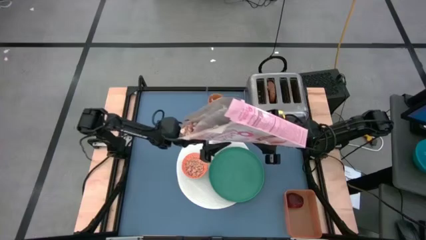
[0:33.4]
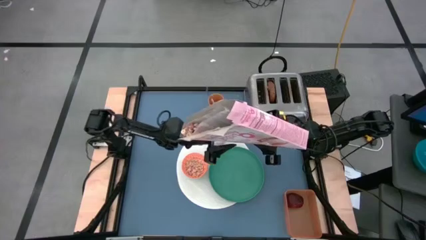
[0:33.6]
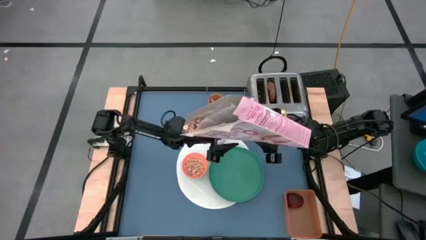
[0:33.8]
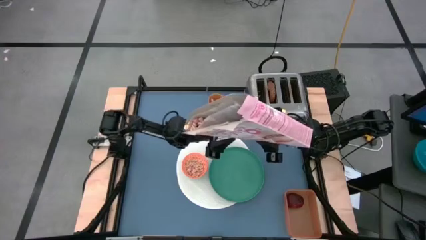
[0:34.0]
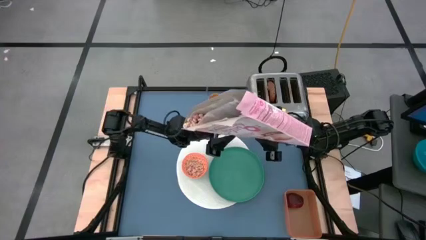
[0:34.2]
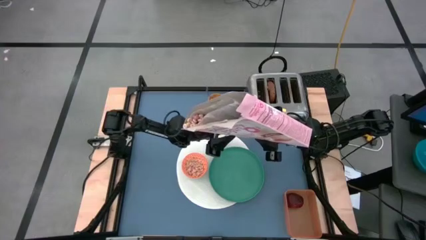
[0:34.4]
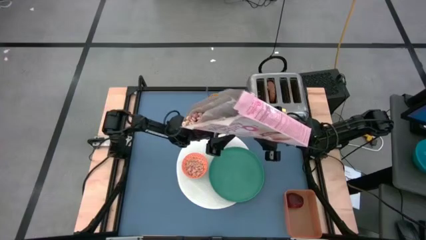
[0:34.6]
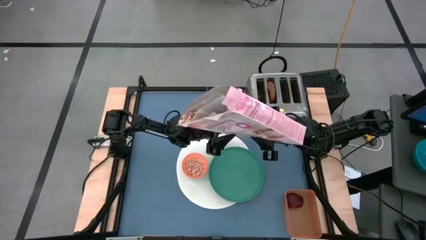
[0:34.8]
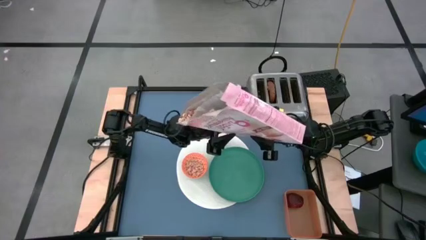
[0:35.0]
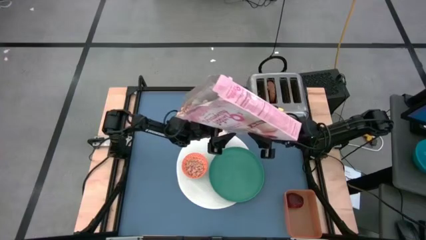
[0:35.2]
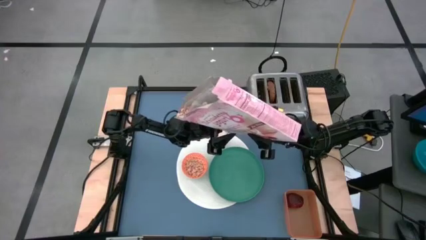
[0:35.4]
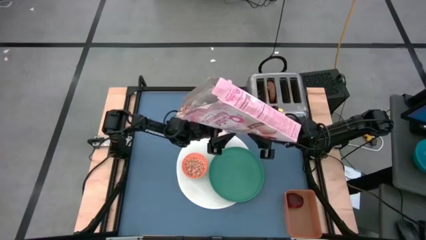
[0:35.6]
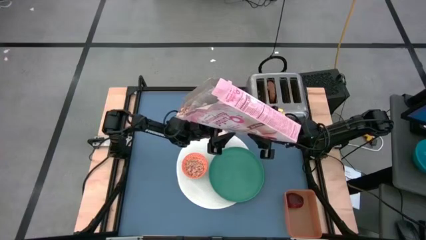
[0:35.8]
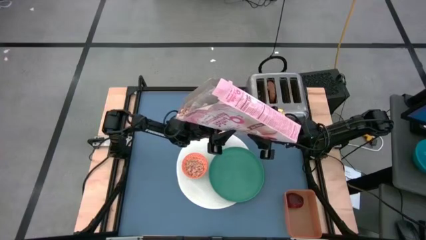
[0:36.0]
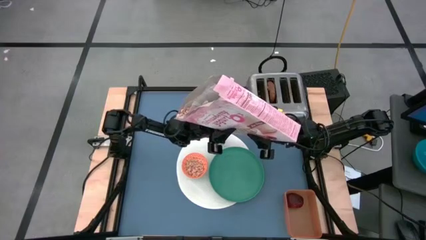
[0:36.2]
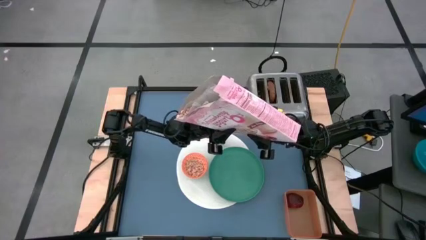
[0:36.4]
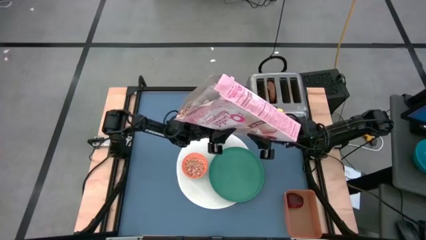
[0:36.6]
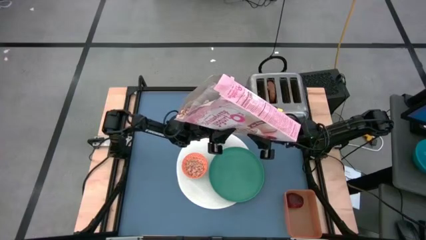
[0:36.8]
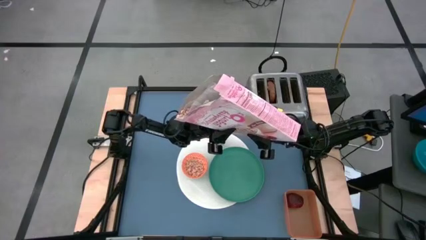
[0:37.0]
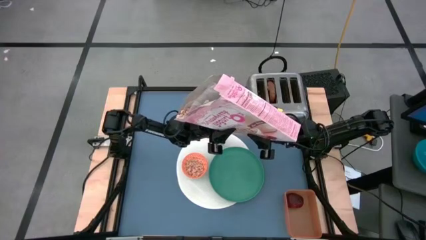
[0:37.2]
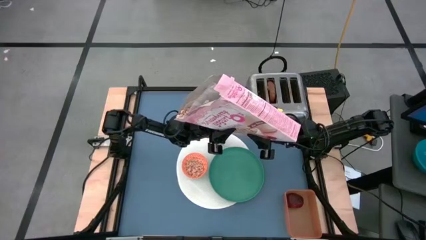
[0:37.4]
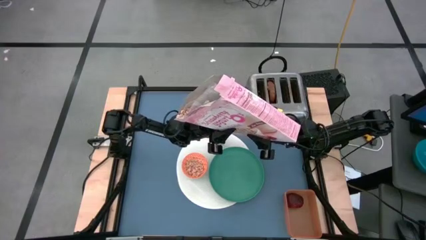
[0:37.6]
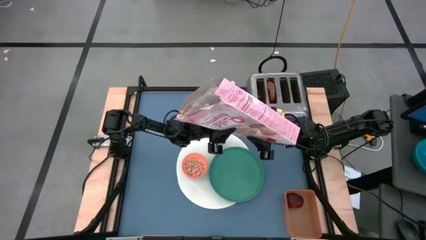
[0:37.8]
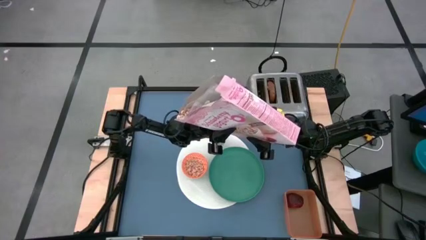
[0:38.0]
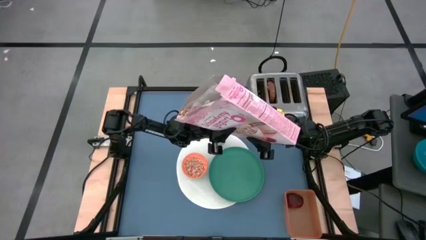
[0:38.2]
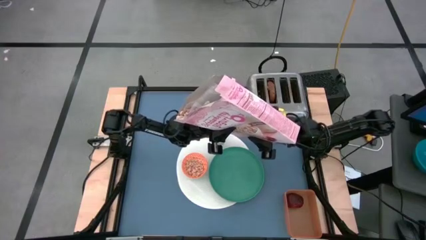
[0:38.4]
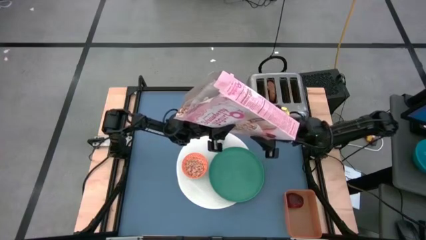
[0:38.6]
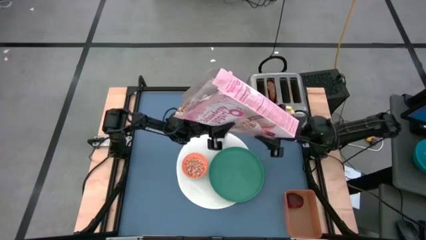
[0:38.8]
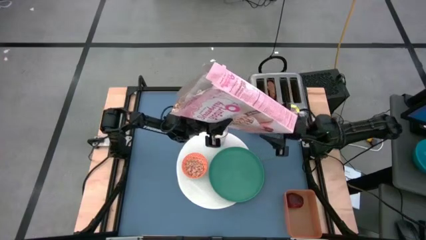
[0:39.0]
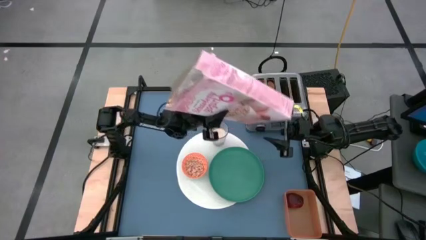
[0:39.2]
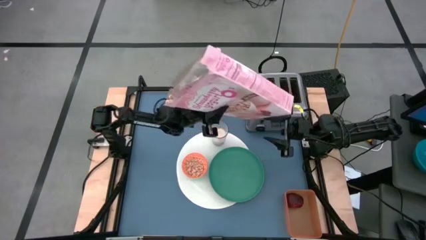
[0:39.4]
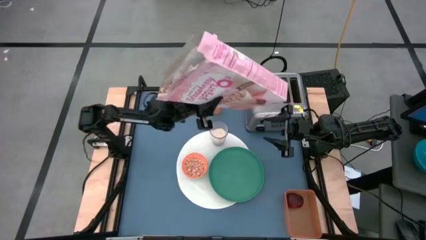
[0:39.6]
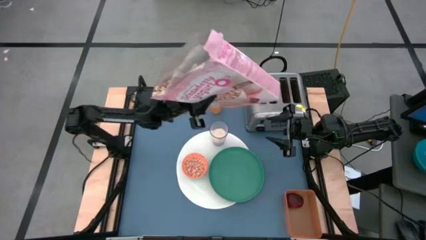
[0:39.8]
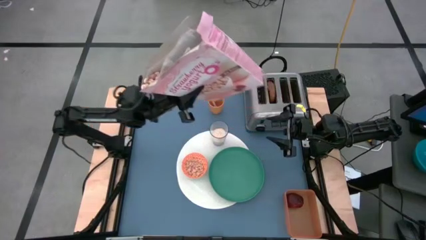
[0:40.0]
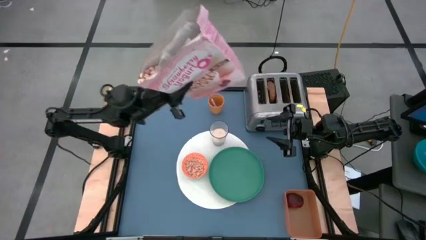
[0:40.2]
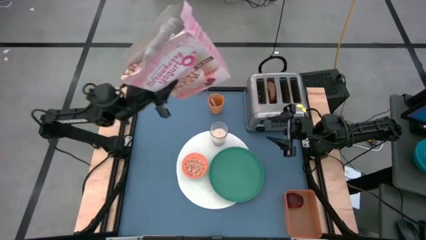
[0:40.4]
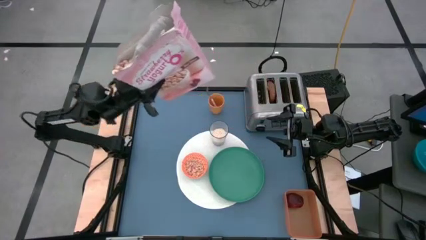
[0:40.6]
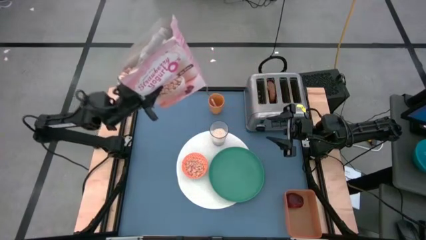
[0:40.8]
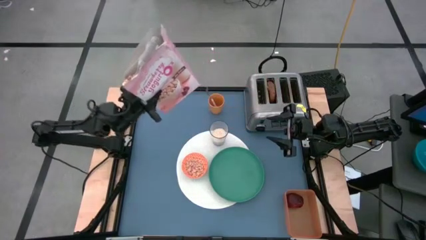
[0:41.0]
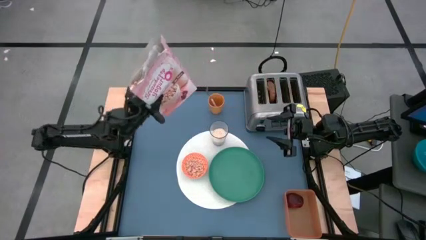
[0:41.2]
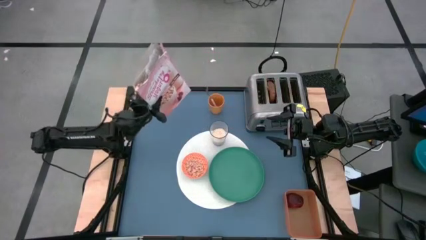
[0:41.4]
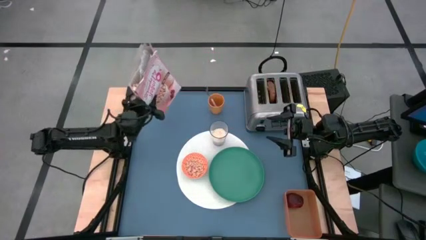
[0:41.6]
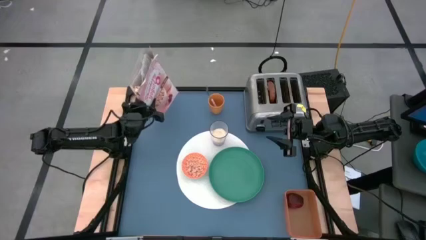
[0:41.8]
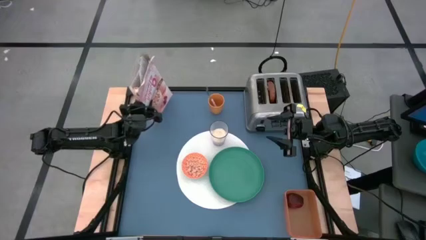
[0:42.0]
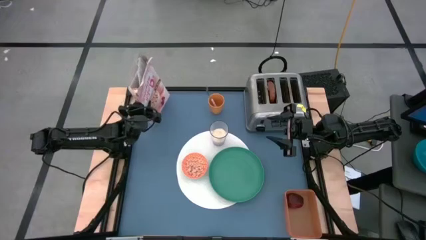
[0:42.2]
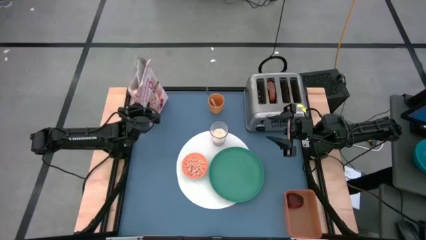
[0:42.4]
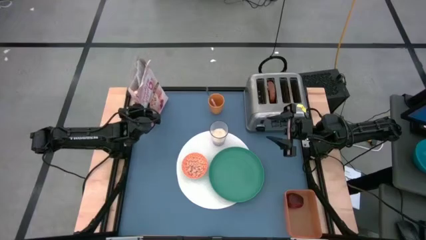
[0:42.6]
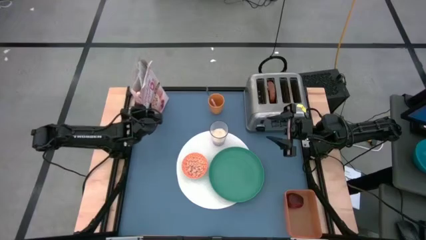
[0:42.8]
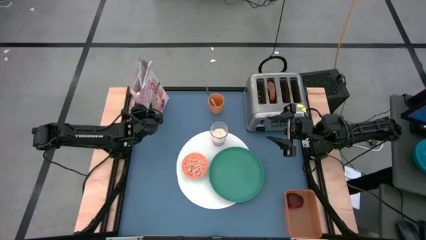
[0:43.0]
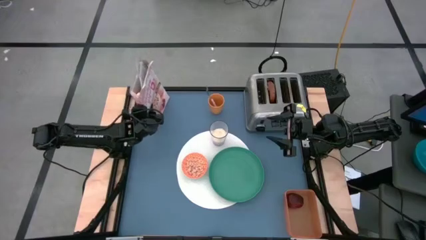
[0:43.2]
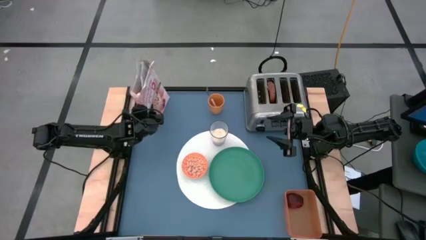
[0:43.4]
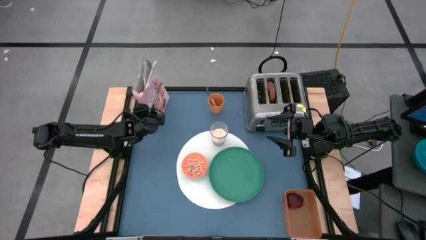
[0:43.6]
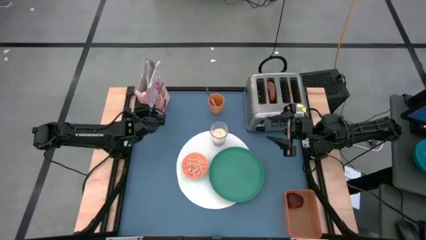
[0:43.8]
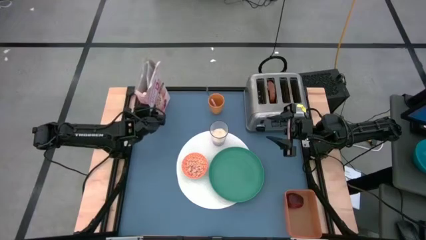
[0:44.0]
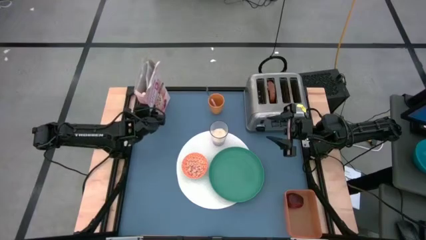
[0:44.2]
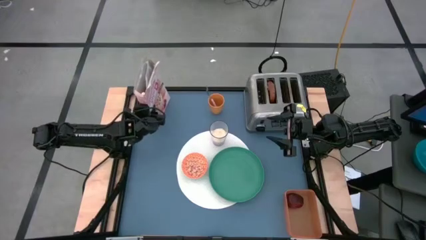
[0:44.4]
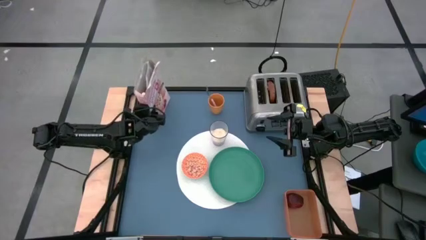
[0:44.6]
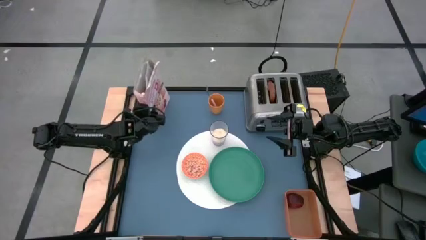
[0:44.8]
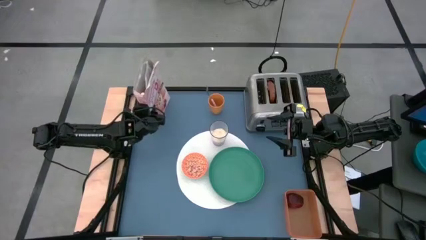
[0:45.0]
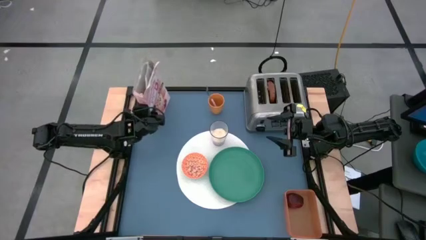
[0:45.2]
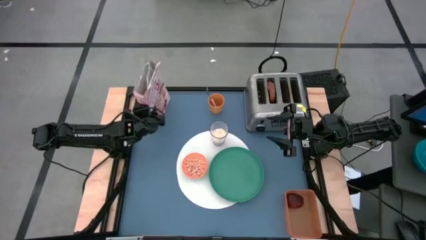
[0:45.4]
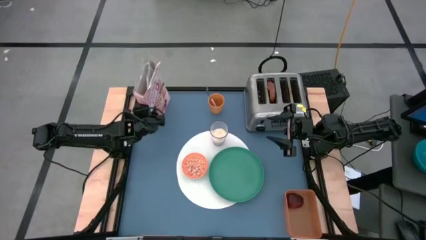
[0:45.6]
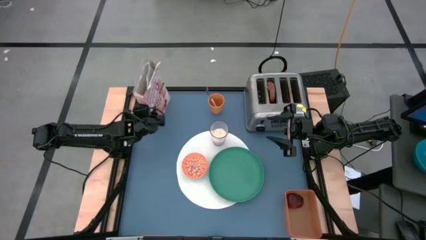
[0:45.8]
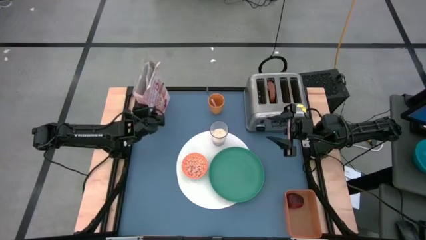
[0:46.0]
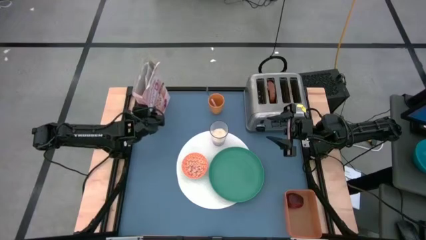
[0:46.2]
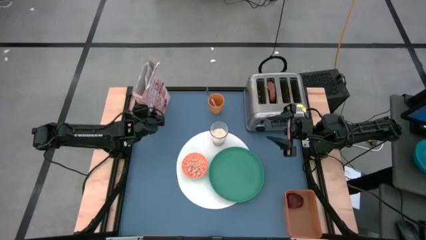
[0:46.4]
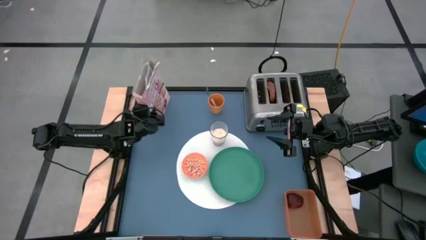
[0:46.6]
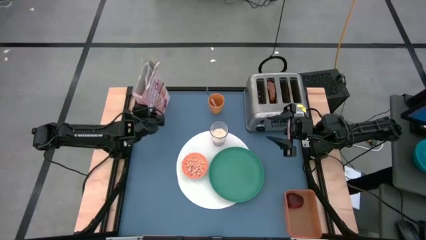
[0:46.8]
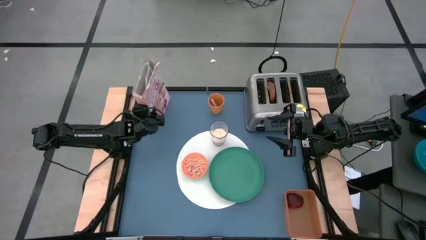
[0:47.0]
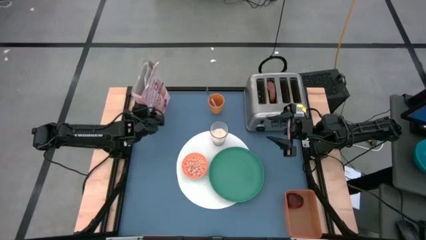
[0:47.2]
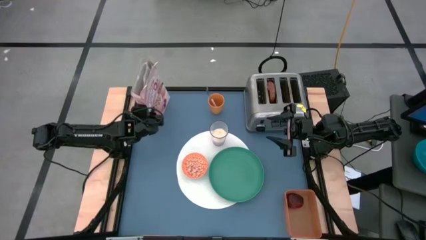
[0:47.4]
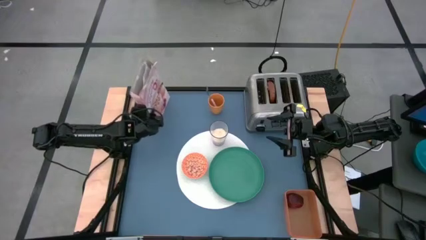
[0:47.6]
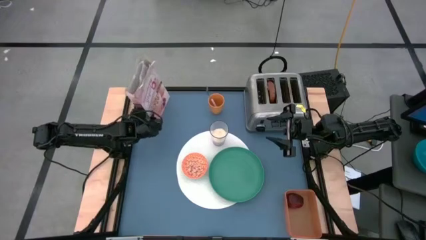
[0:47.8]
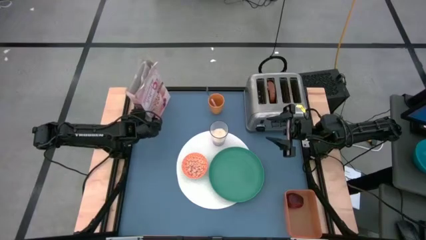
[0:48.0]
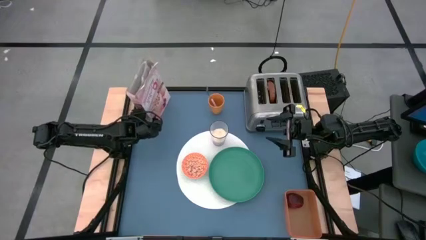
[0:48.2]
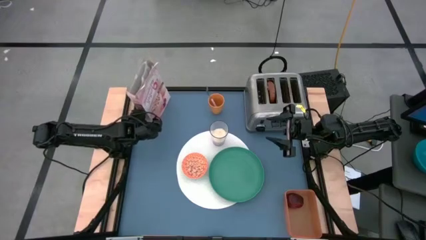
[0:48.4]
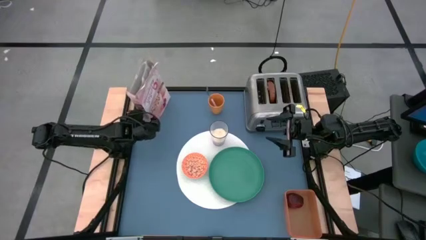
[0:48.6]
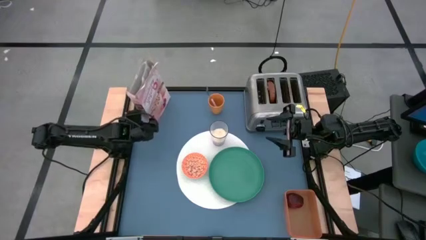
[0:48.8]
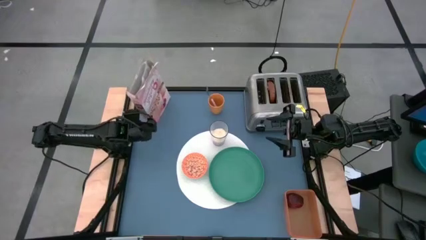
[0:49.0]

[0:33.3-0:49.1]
Task: Arrange a breakfast setting
Pour the cereal from the cereal box into the orange bowl

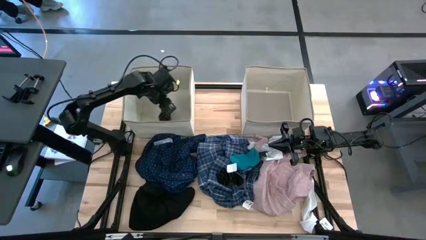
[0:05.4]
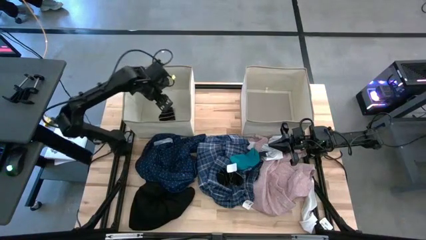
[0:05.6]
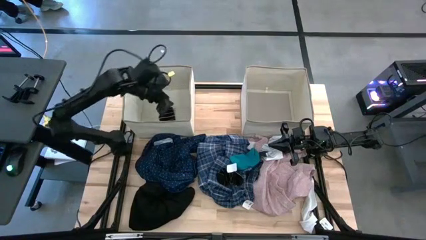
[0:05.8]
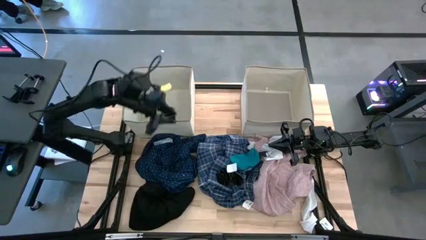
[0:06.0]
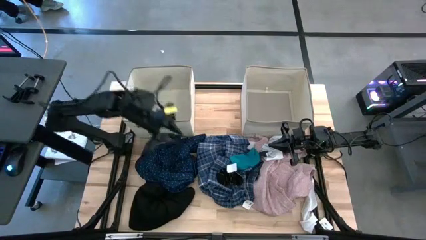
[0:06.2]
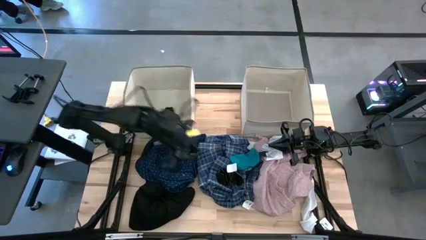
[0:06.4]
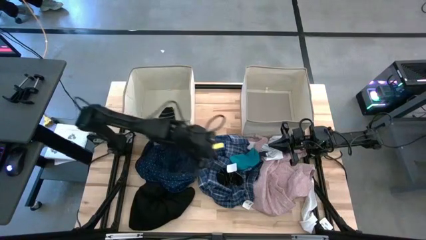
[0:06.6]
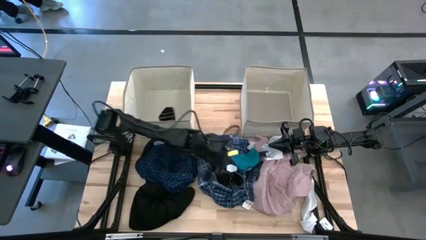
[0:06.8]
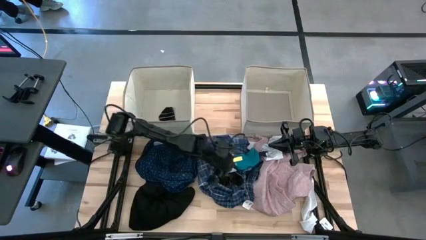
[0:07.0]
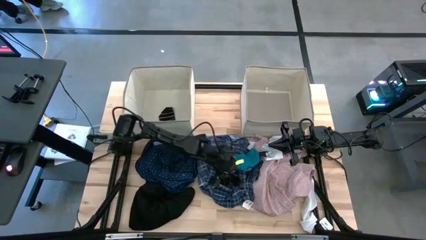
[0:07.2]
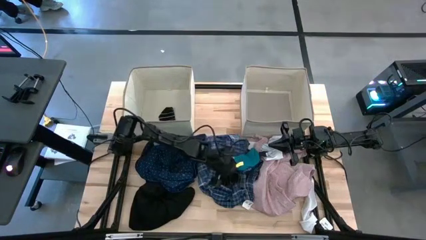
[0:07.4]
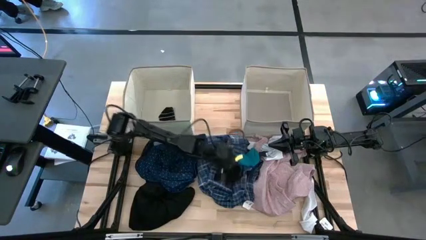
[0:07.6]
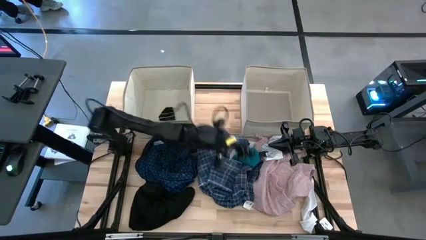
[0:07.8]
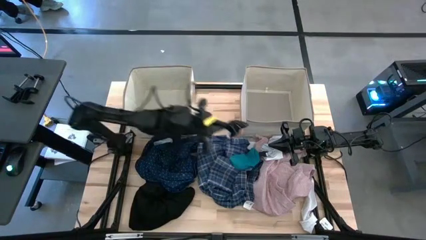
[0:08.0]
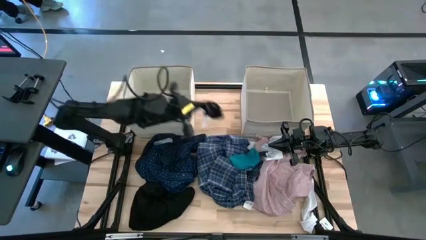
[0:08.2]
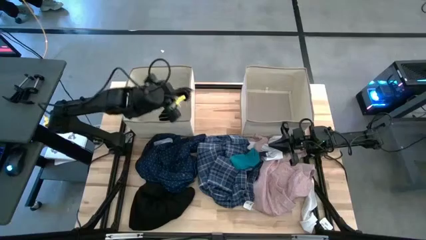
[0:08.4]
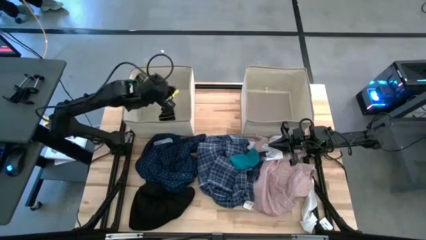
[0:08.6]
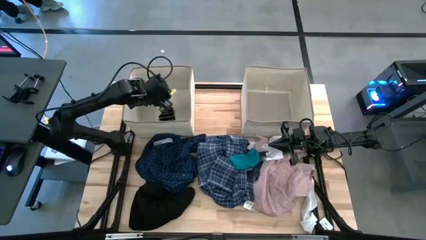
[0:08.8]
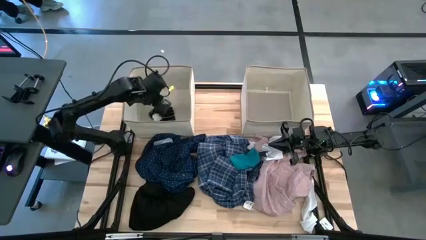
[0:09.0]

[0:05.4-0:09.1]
Task: Sort clothes
Put the black sock into the left laundry bin
